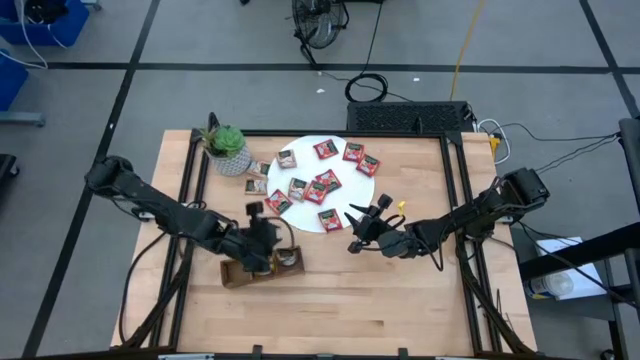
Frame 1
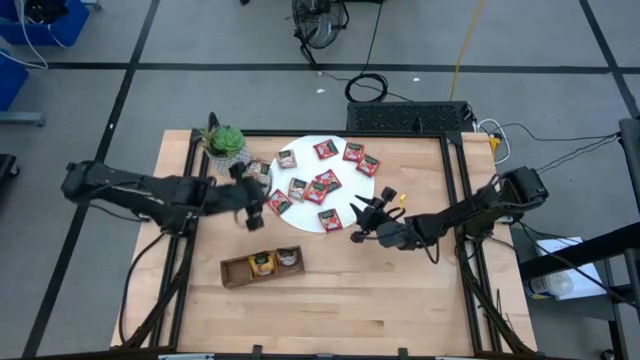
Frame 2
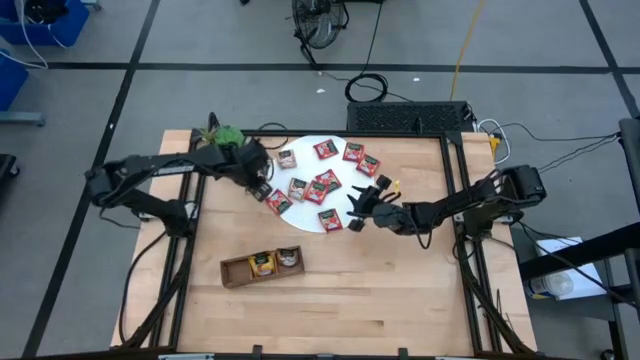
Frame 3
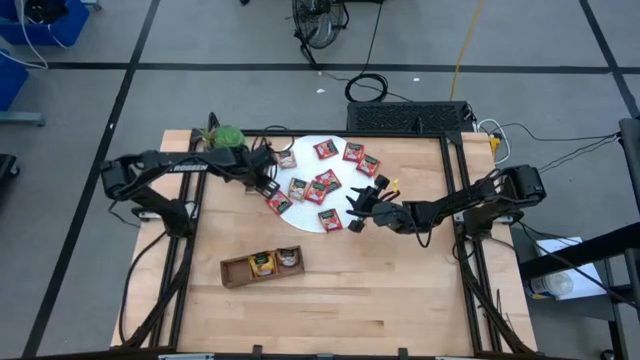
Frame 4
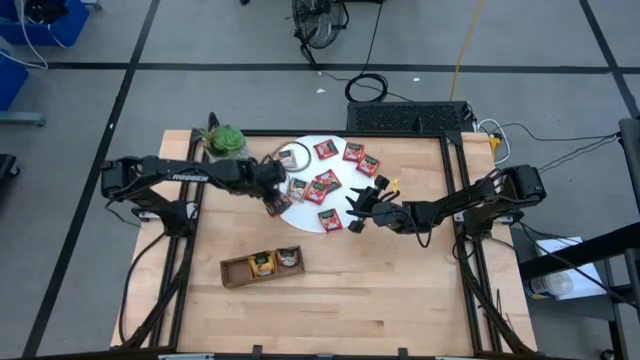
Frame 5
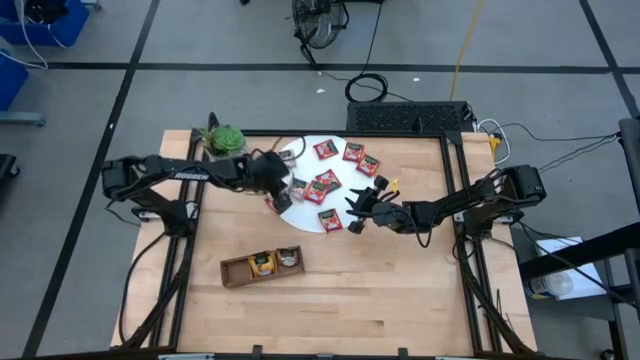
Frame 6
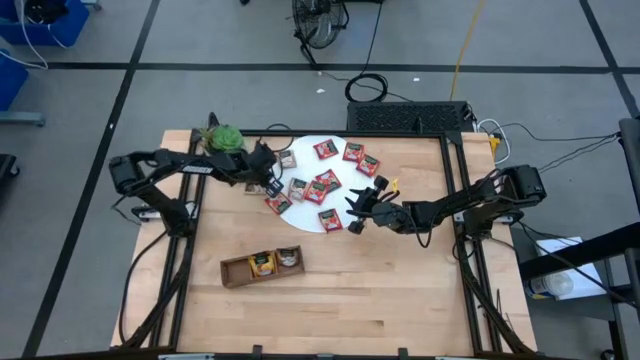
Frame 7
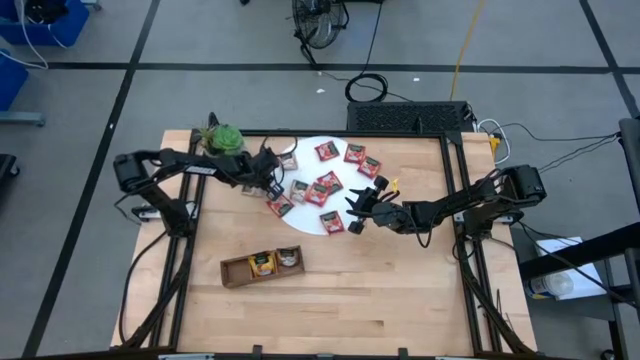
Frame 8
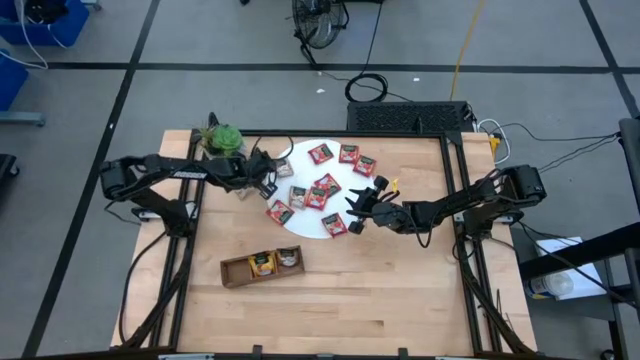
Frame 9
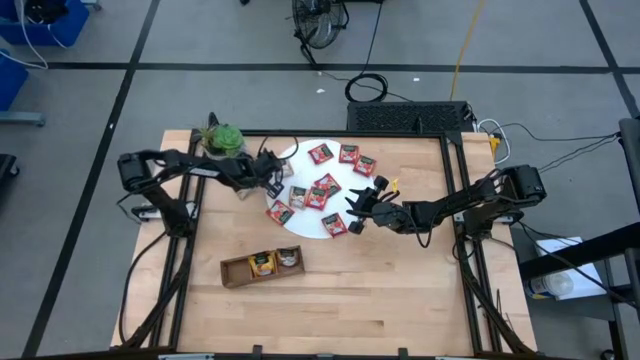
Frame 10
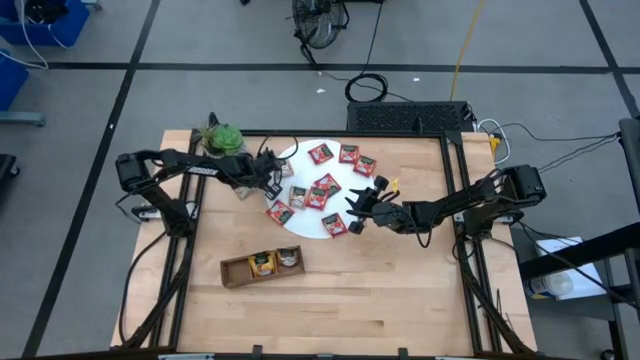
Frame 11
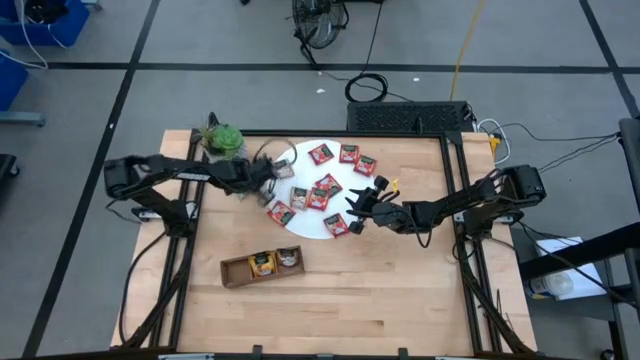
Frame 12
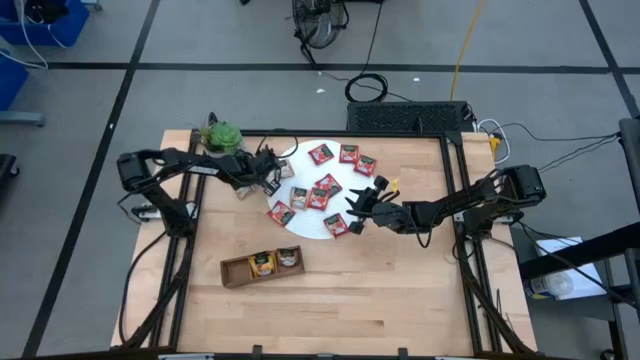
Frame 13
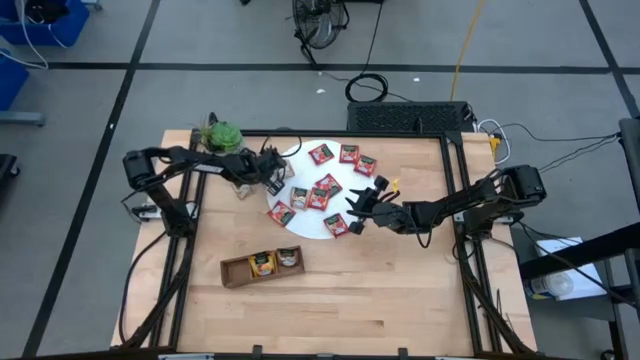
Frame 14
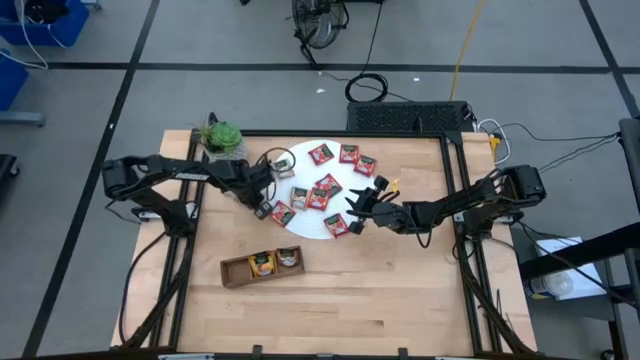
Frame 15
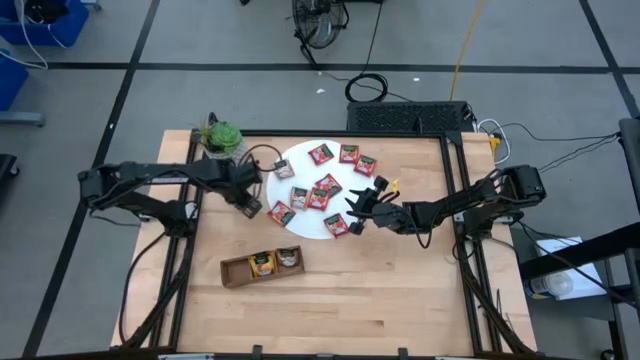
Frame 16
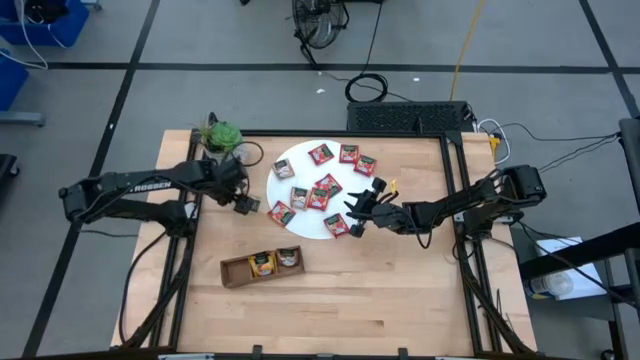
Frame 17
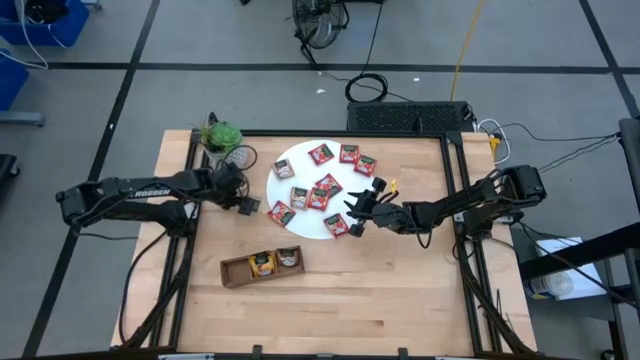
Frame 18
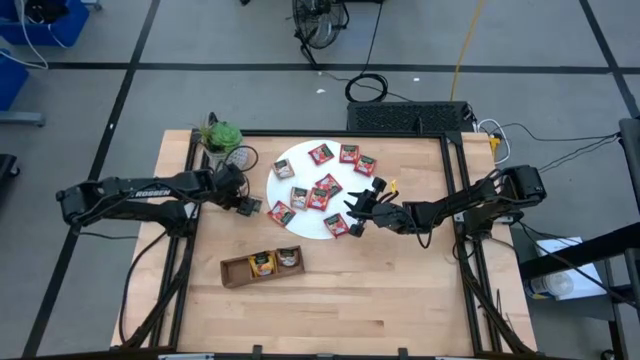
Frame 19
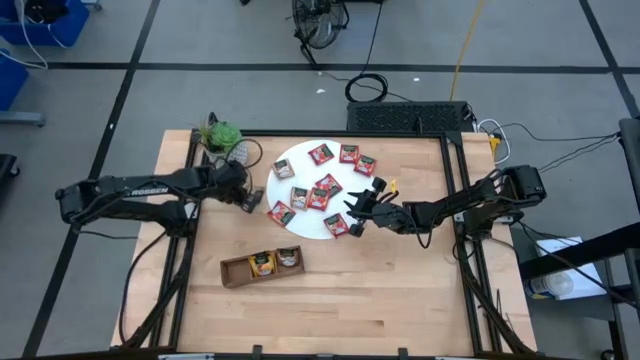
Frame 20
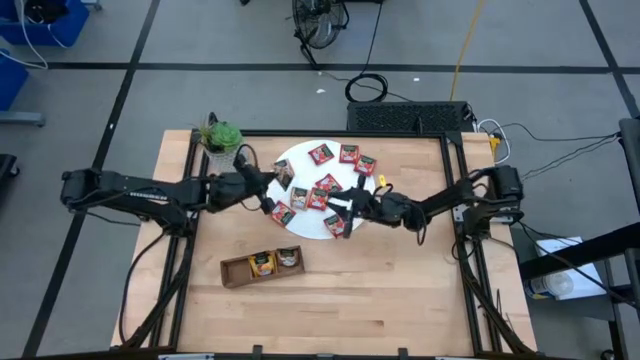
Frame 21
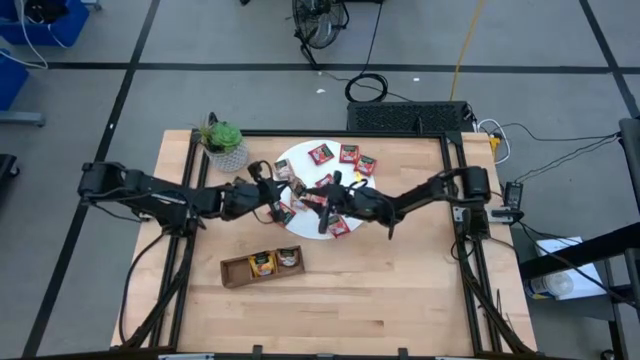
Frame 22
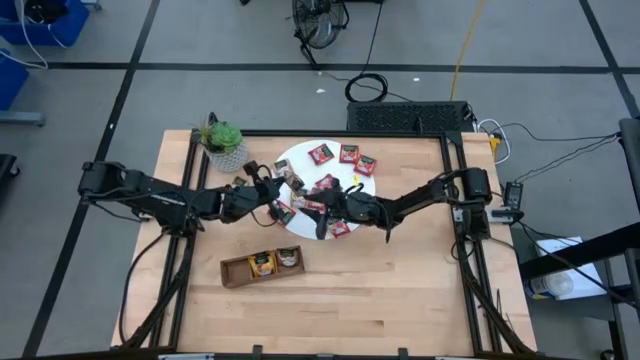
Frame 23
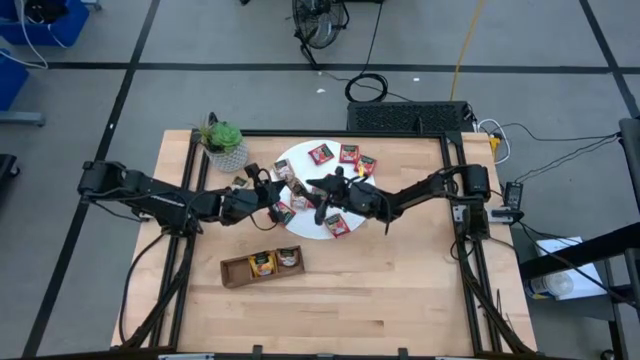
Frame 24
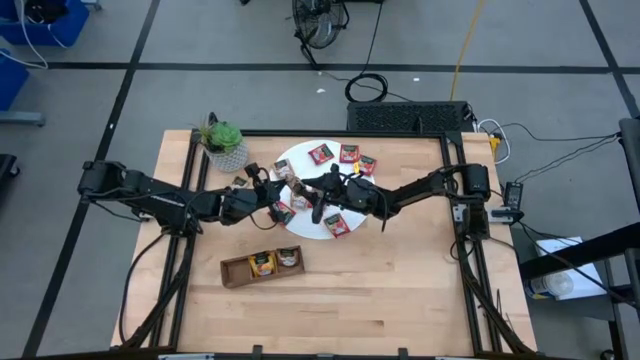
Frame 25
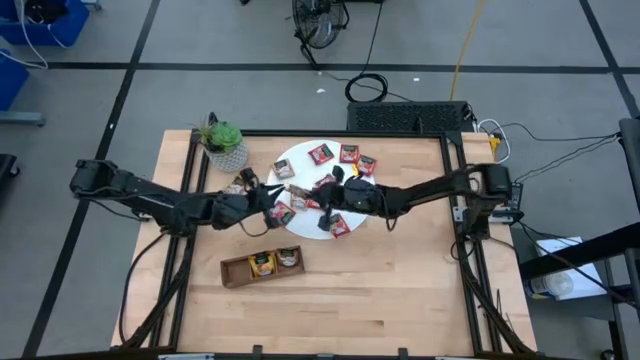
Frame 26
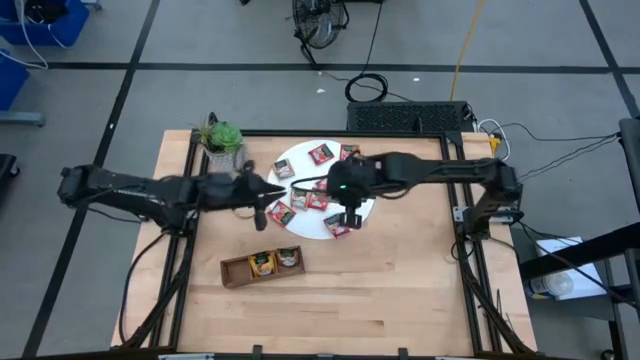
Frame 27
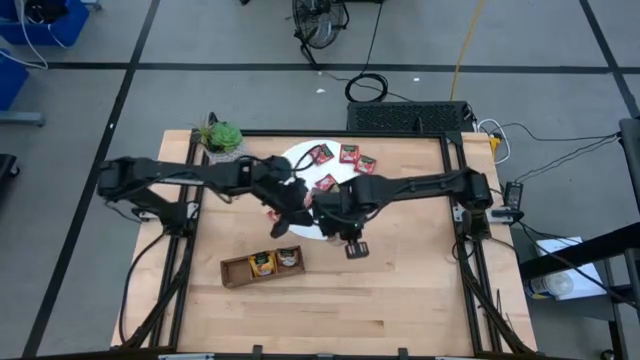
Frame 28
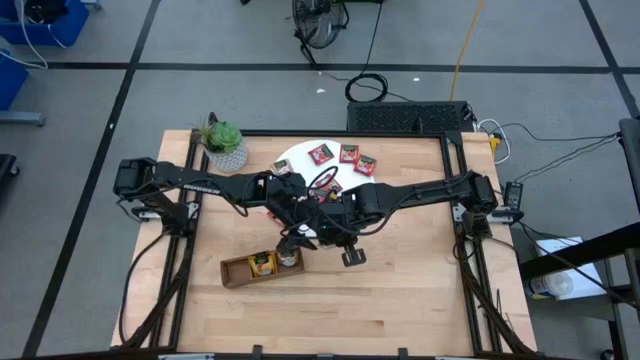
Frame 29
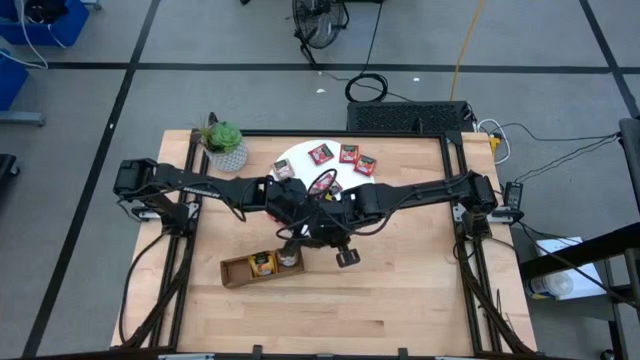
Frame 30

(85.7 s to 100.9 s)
Task: Pick & Place Tea
Put the brown tea bag into the right section of the wooden organizer

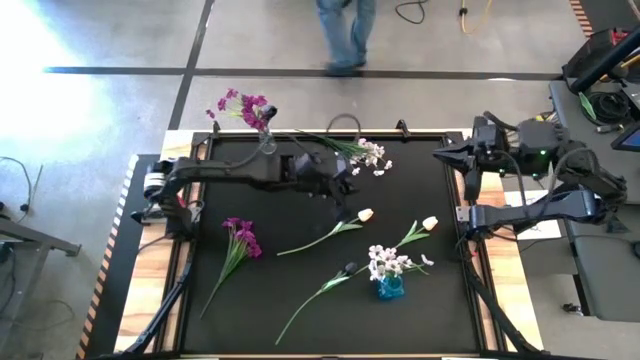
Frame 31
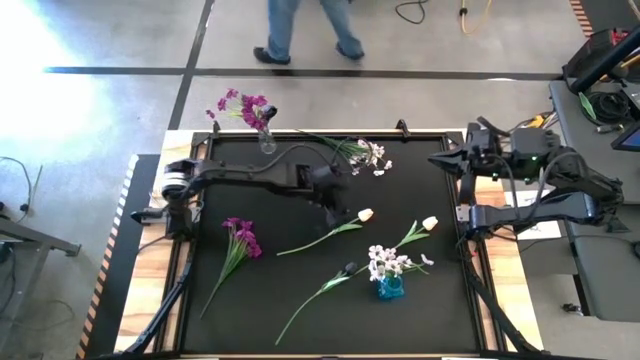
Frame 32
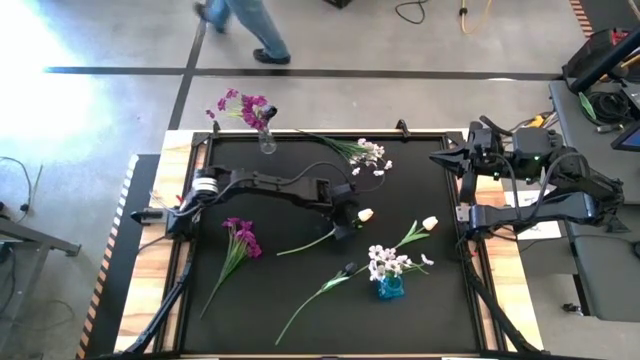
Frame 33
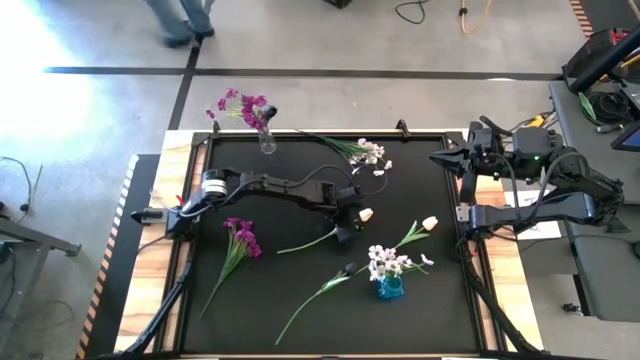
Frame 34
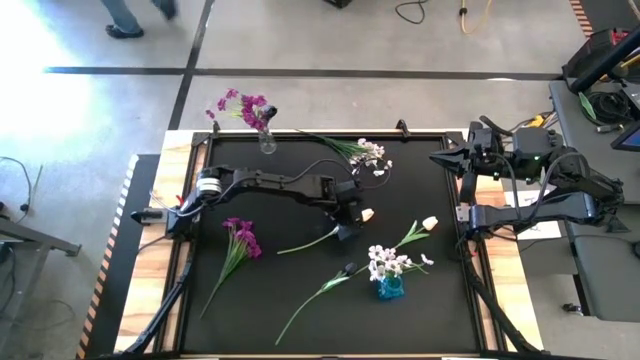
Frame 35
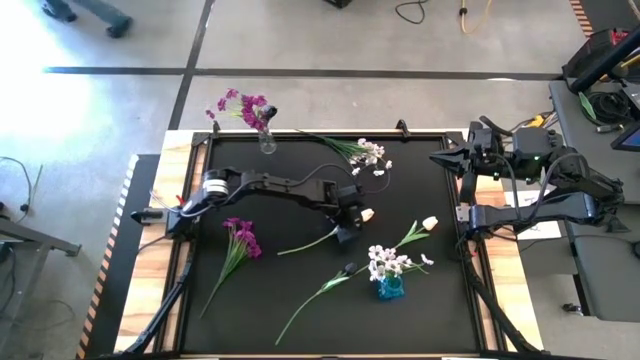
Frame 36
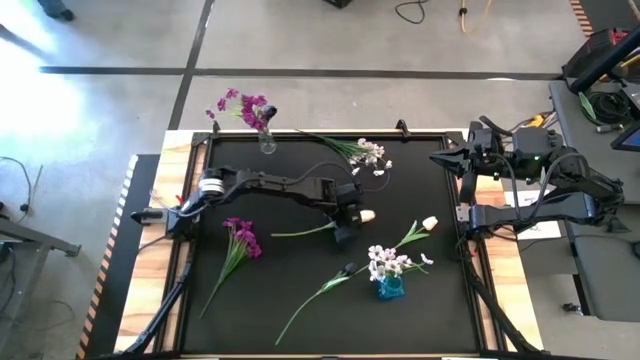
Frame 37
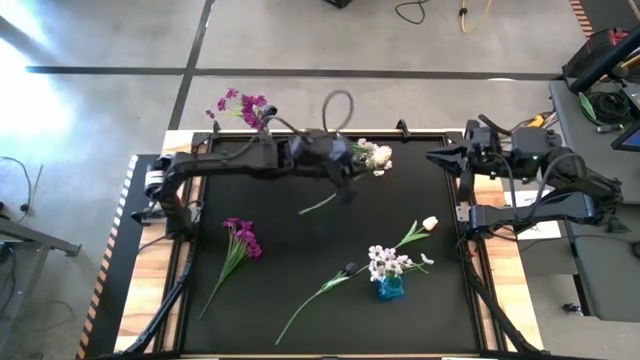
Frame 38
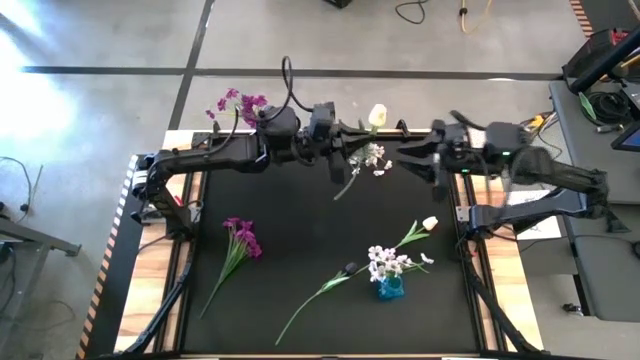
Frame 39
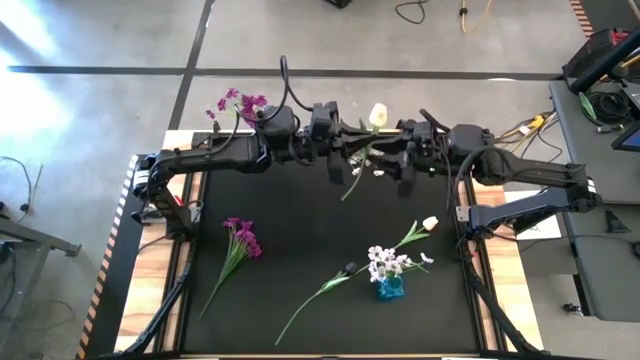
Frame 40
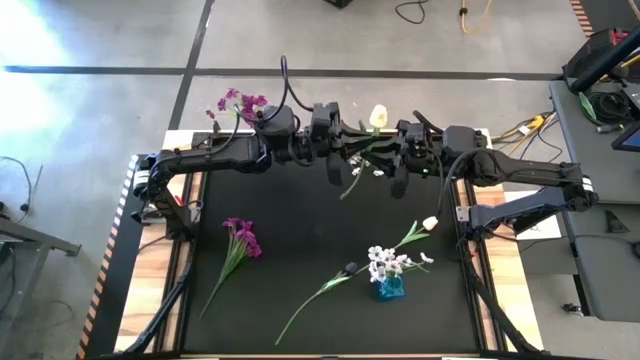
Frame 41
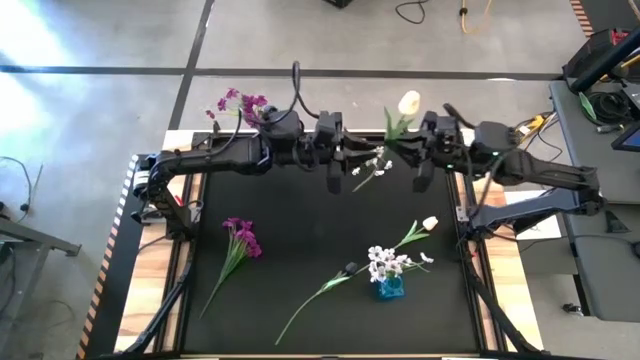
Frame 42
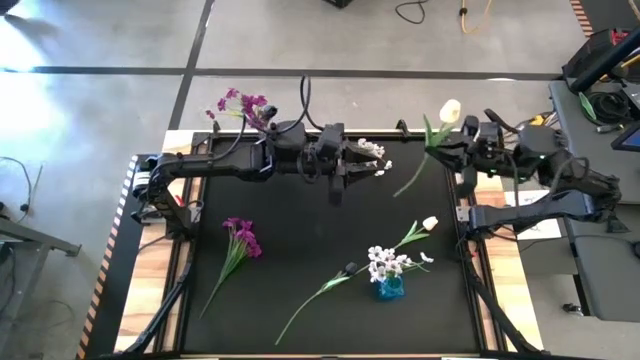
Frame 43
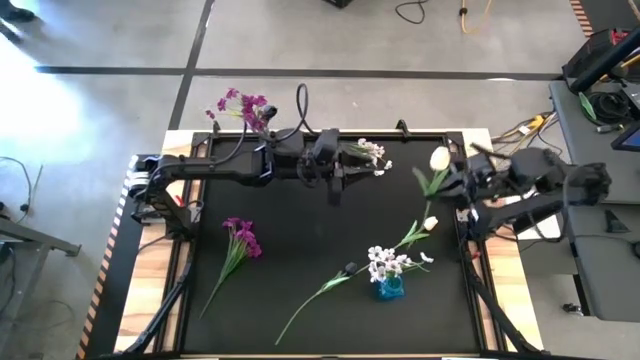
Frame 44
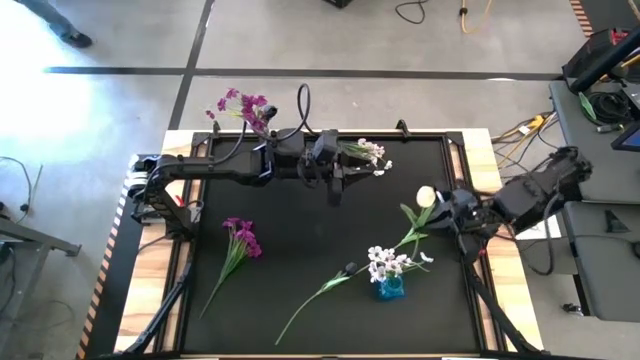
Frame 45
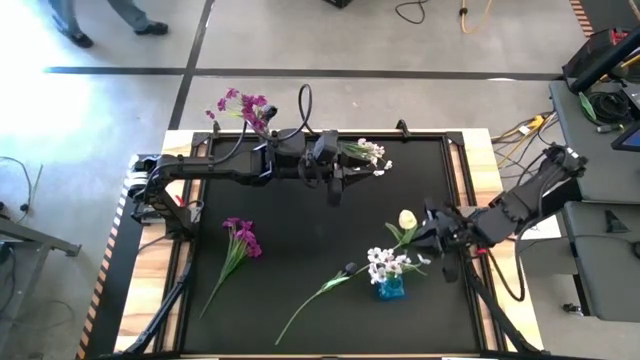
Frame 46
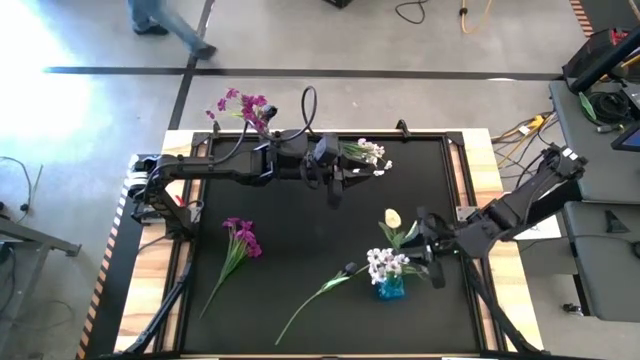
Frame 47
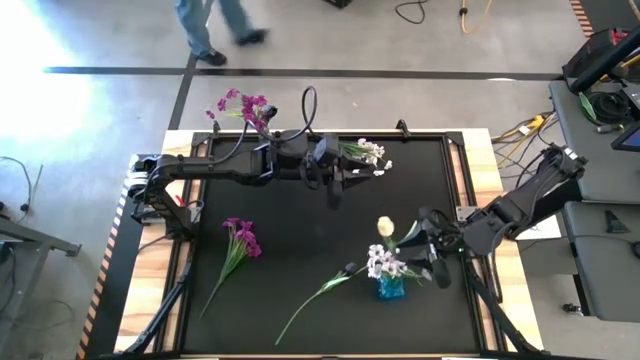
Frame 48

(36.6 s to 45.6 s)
Task: Sort flowers into vase by color
Put the left white tulip into the blue vase
